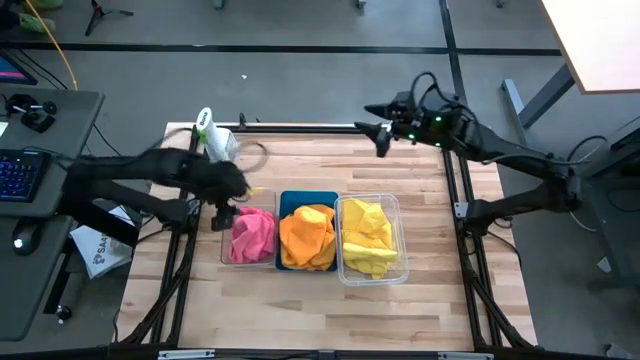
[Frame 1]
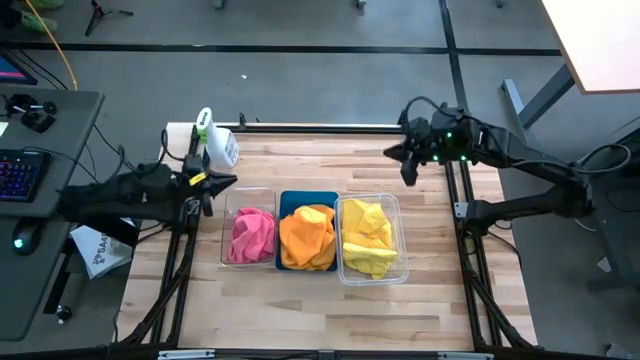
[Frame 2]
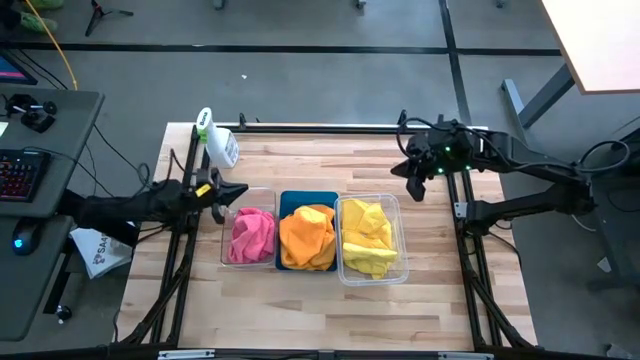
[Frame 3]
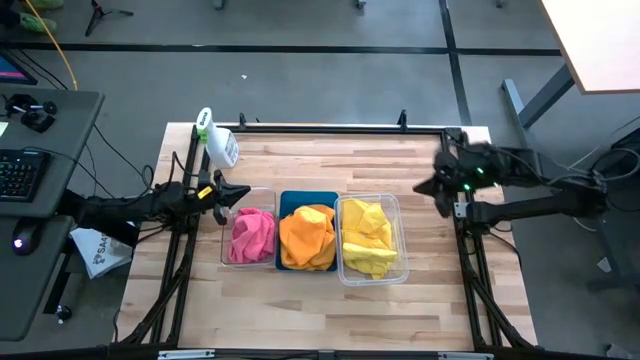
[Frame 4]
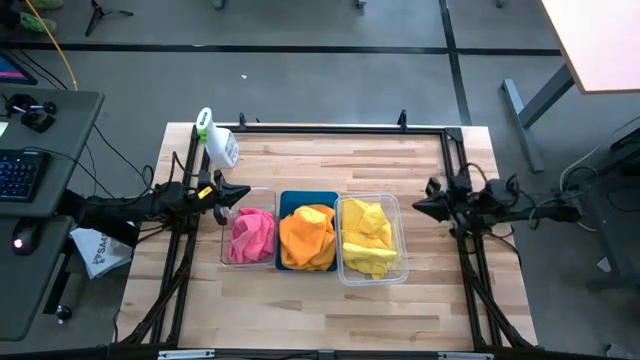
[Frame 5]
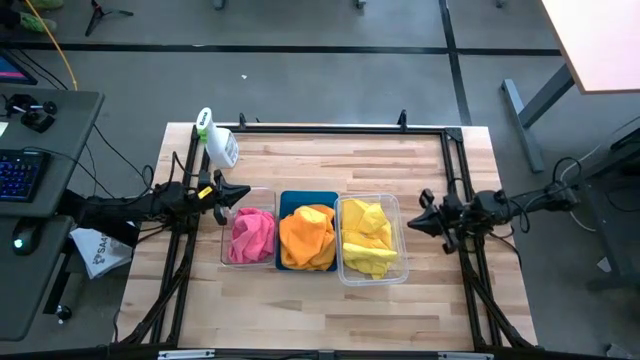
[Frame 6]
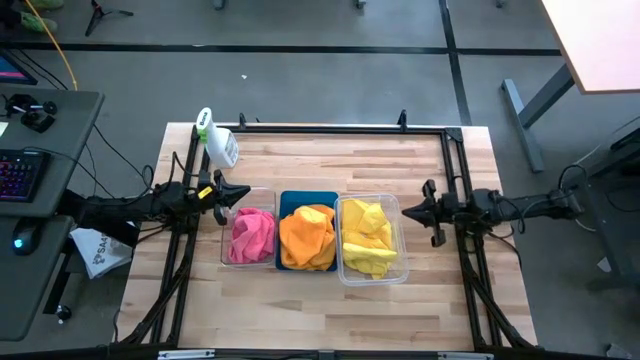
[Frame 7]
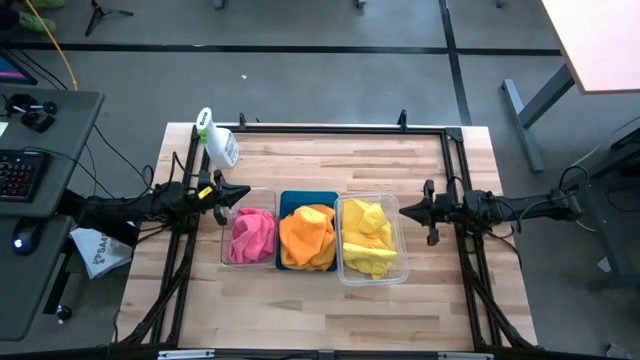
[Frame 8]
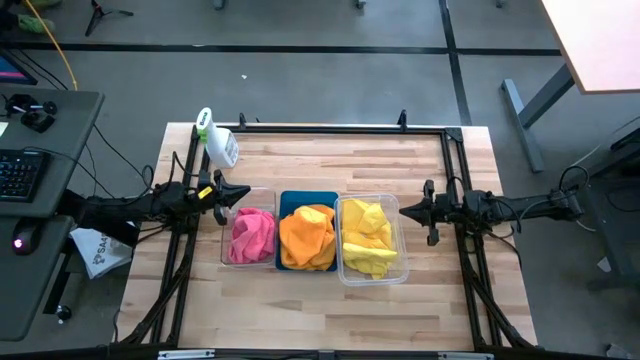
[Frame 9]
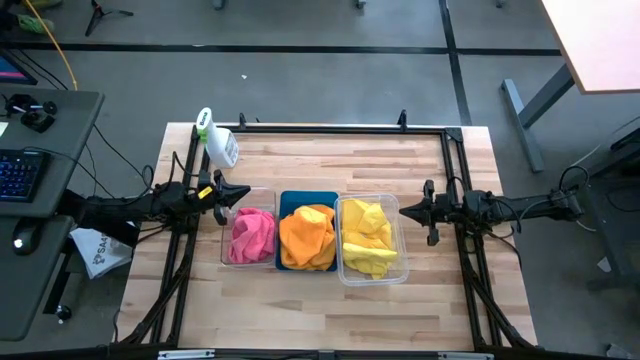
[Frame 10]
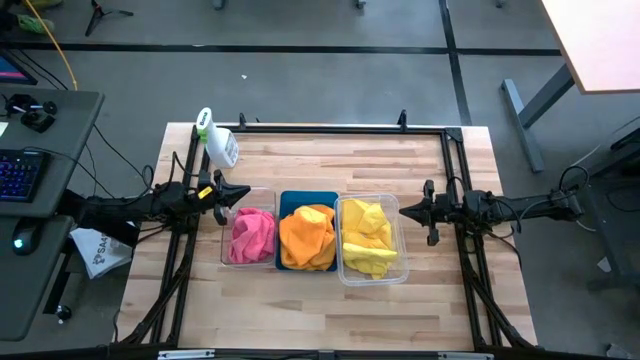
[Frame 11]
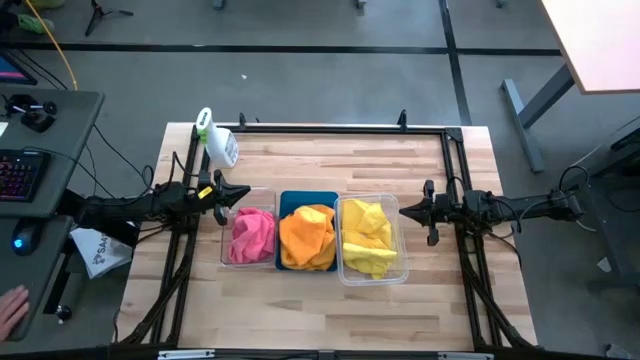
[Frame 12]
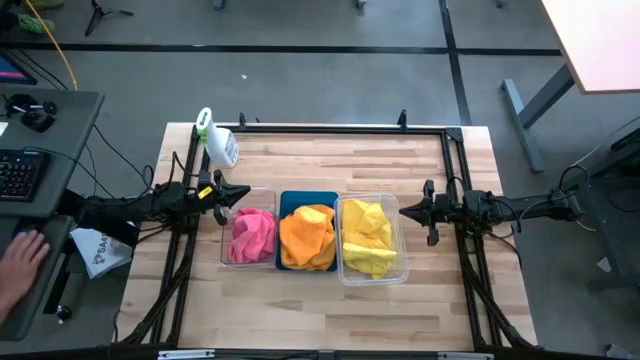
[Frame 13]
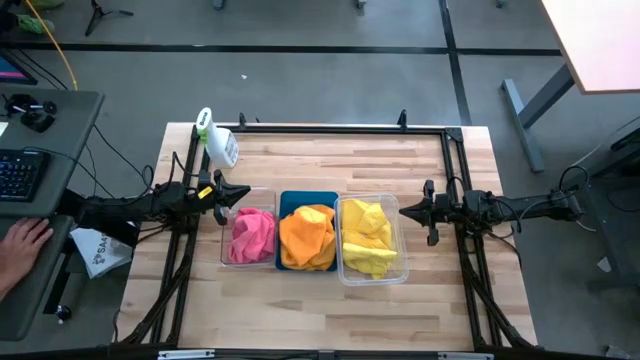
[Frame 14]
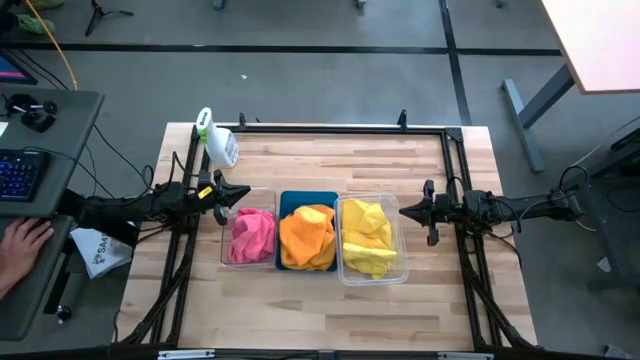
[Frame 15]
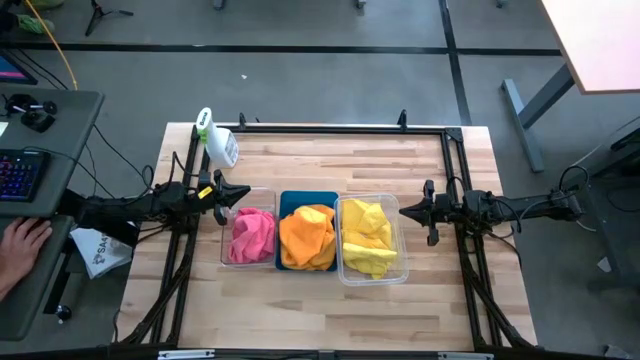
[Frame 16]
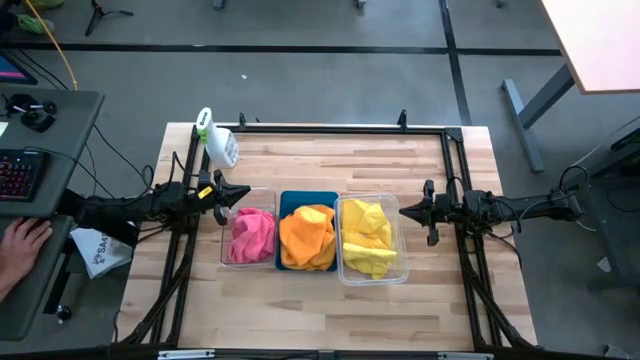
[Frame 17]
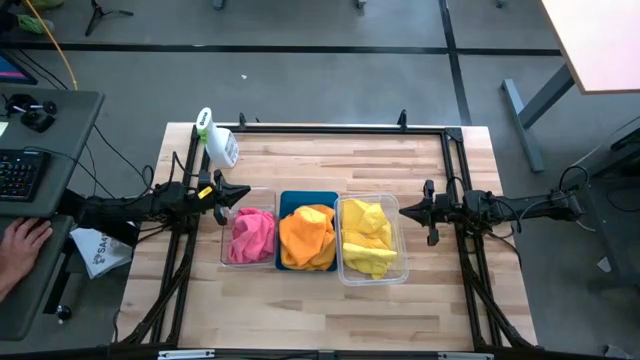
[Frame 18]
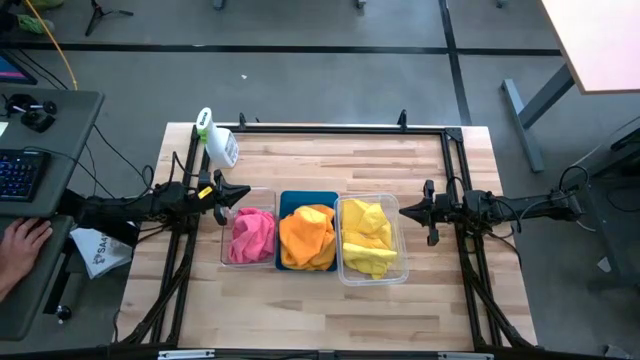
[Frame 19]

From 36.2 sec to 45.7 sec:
Task: Sort microfiber towel by color & place in baskets
Return to Home Position

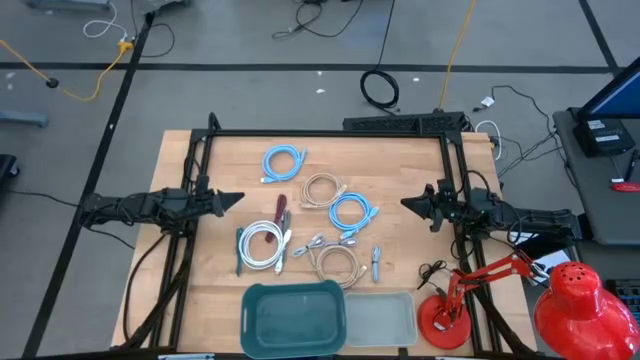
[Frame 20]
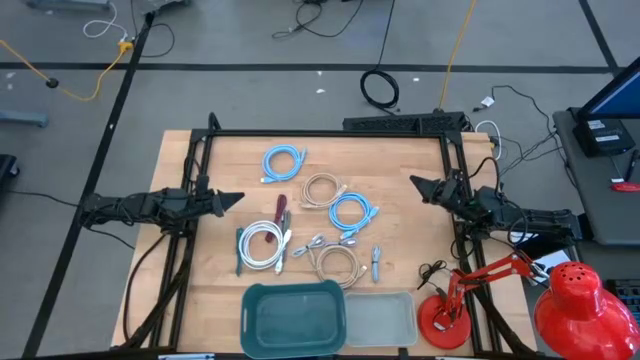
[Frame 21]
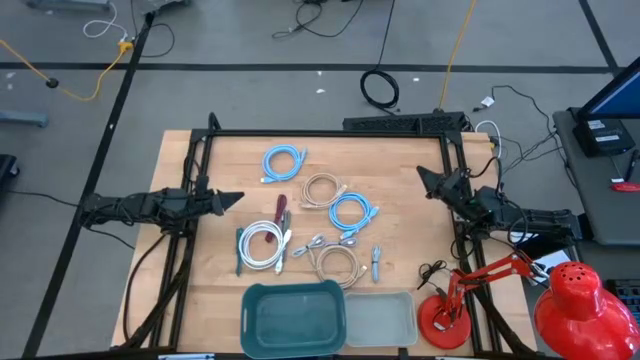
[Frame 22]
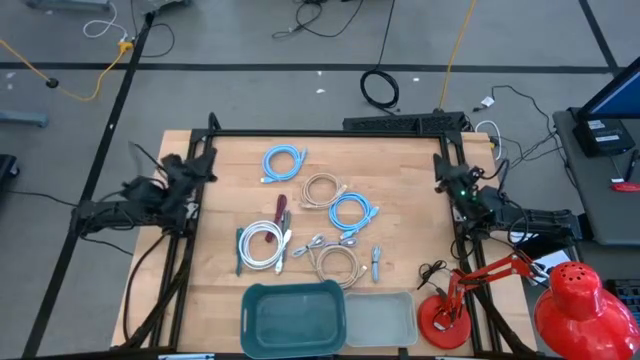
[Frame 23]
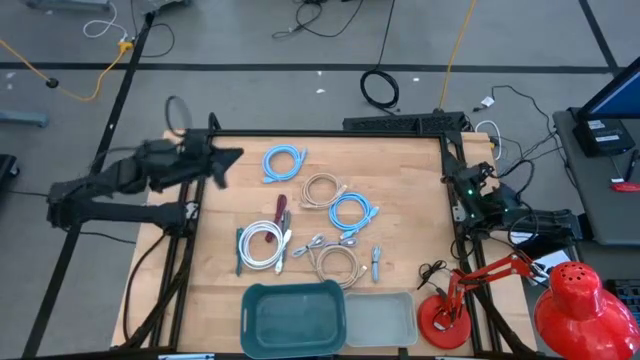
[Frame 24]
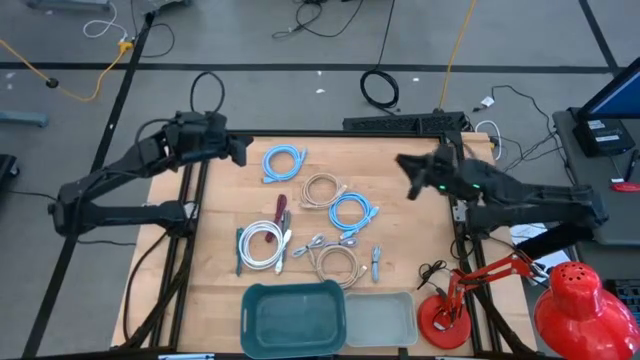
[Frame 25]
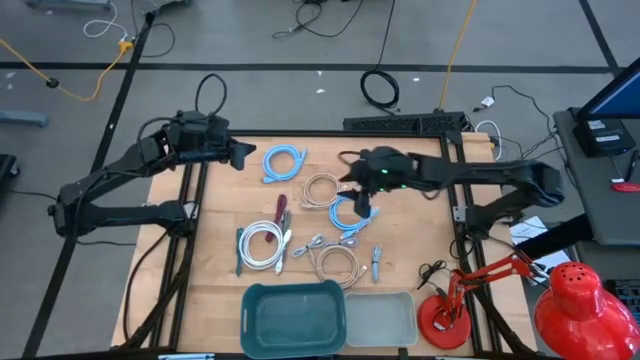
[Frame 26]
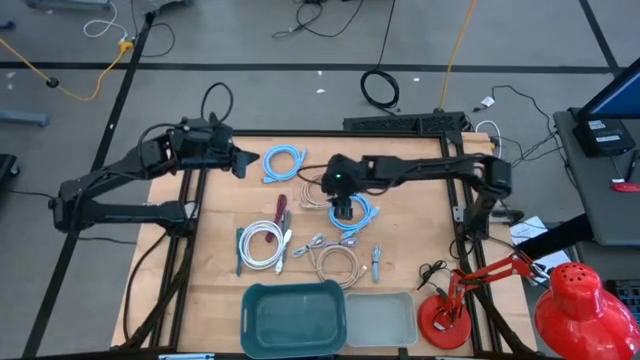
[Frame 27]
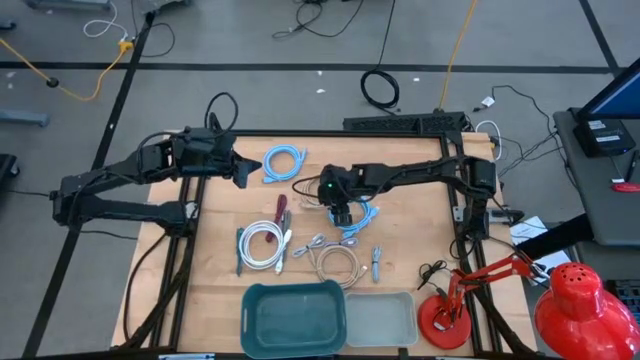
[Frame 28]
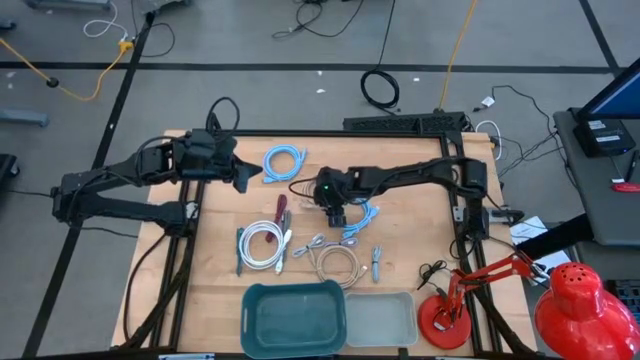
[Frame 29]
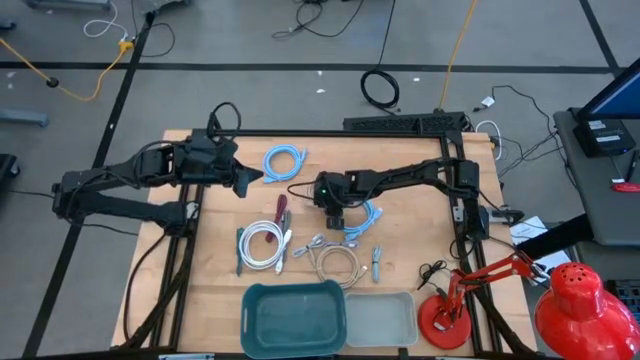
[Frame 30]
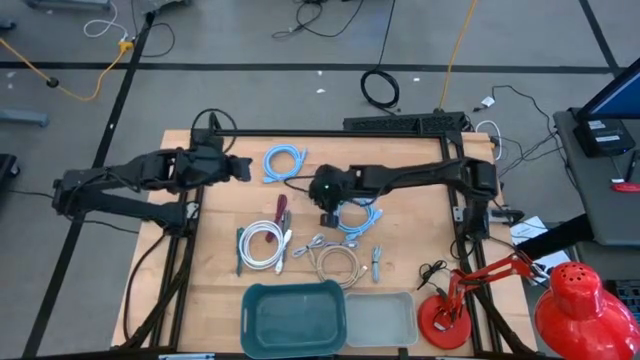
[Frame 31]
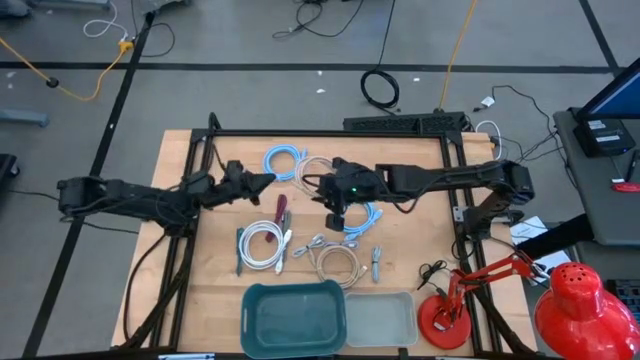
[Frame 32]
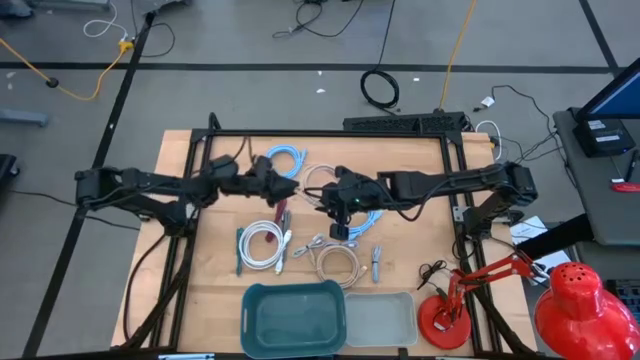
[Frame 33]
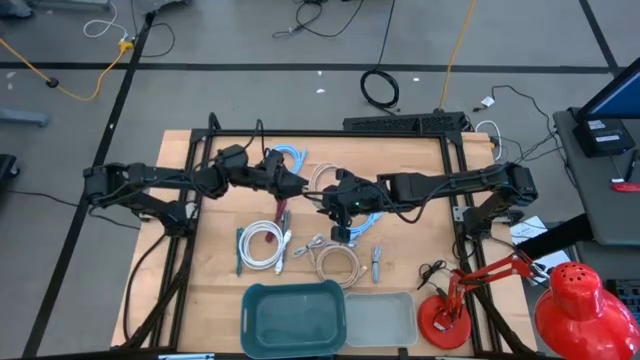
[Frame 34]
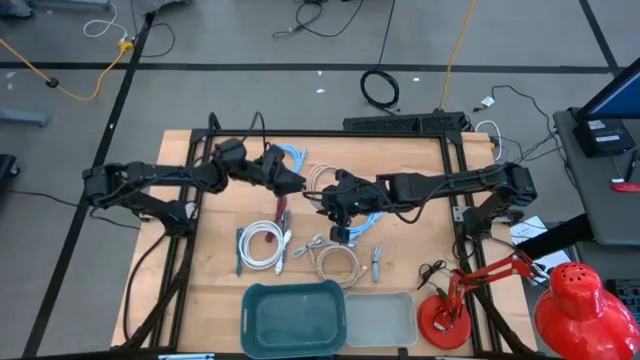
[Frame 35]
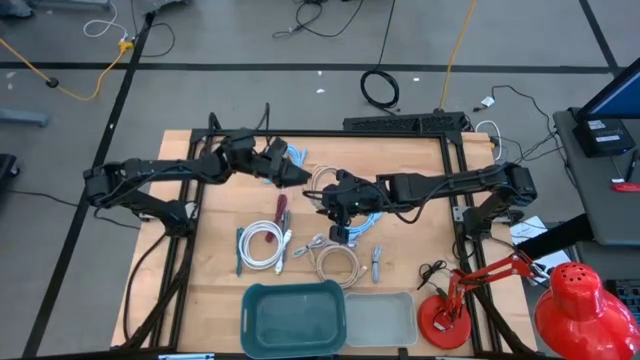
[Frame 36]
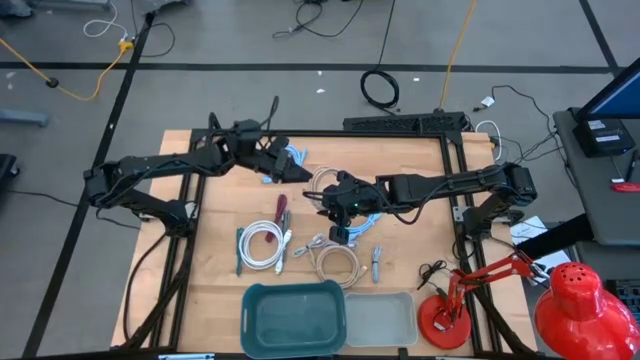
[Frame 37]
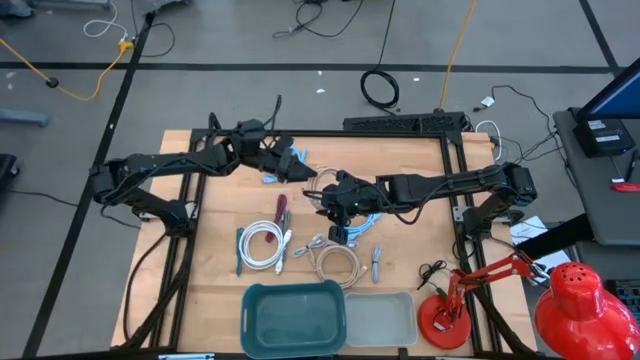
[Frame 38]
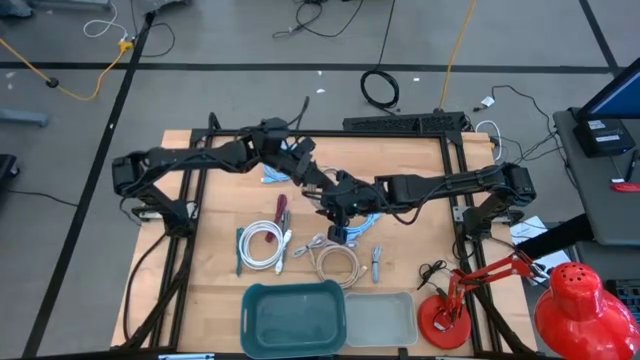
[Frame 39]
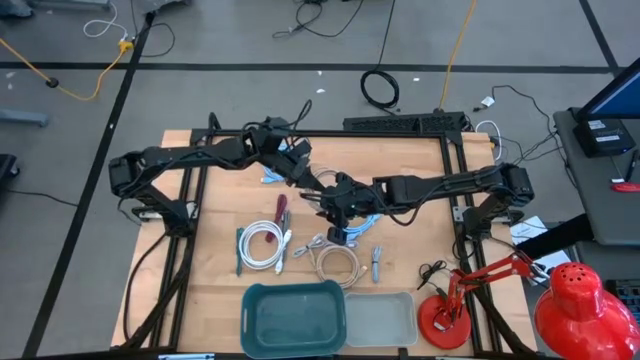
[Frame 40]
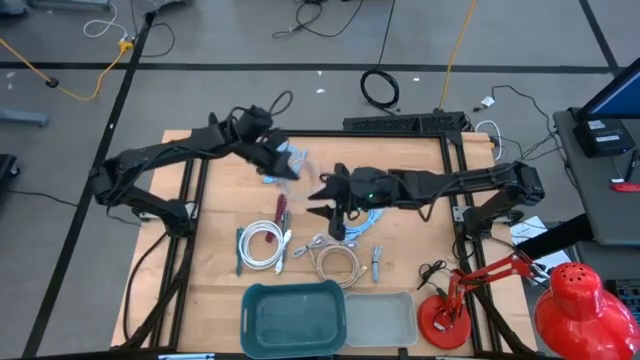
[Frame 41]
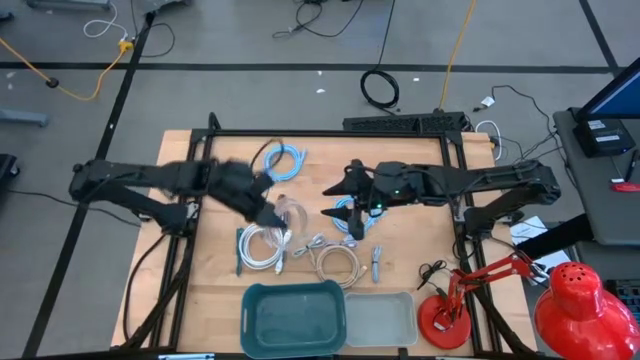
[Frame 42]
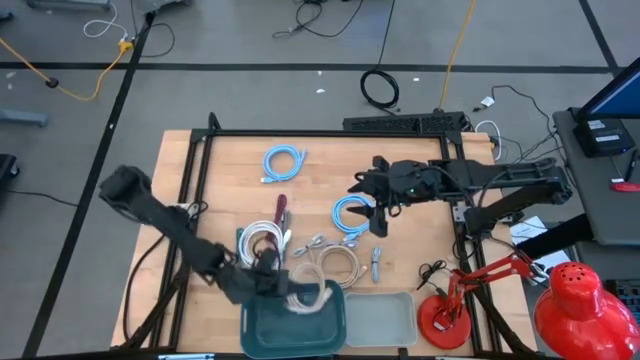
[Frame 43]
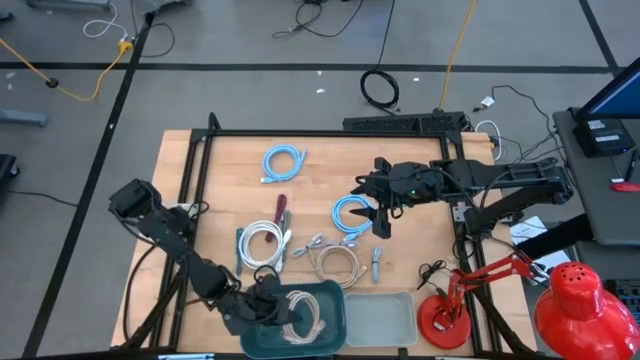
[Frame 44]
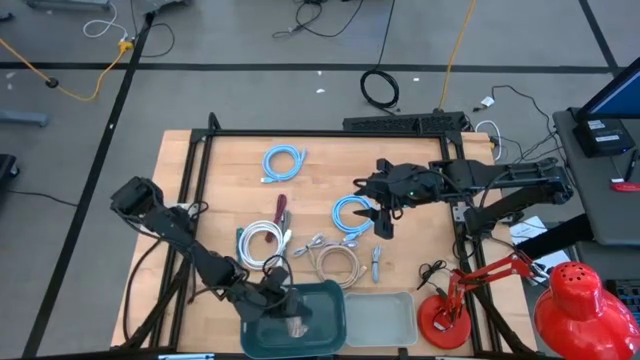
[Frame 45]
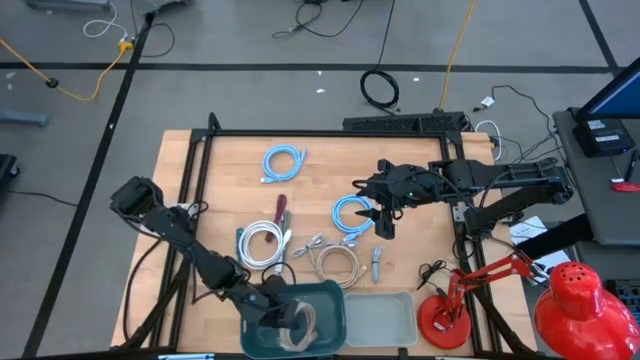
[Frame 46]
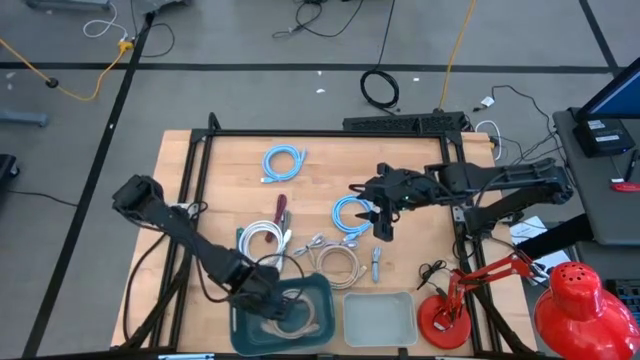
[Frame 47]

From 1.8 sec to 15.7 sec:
Task: Pick & Place USB Port
Put the top large brown charger cable into the dark blue bin
